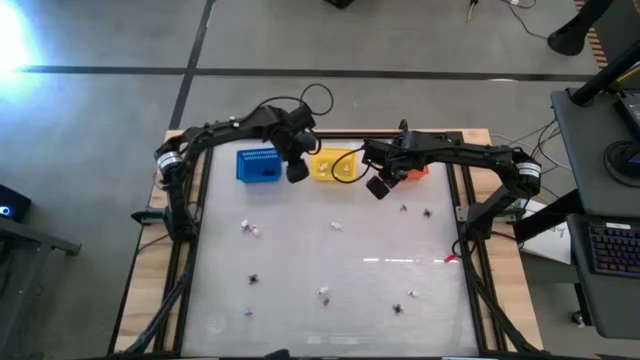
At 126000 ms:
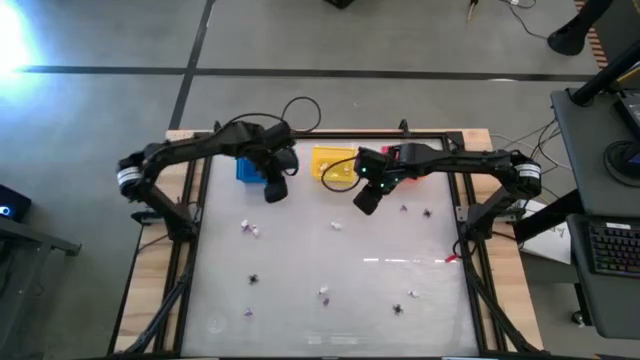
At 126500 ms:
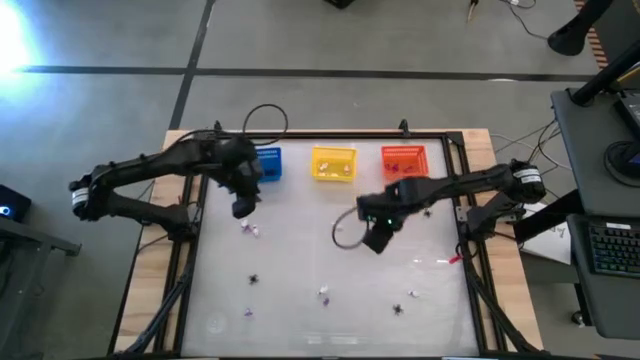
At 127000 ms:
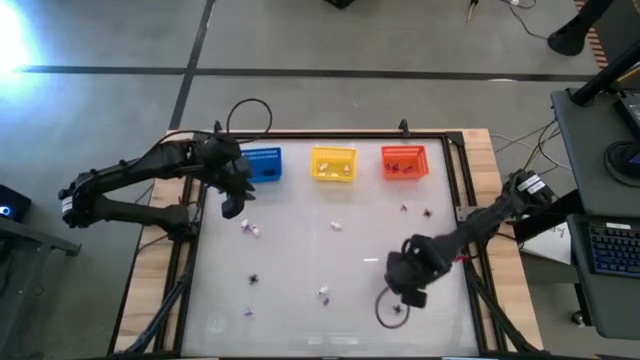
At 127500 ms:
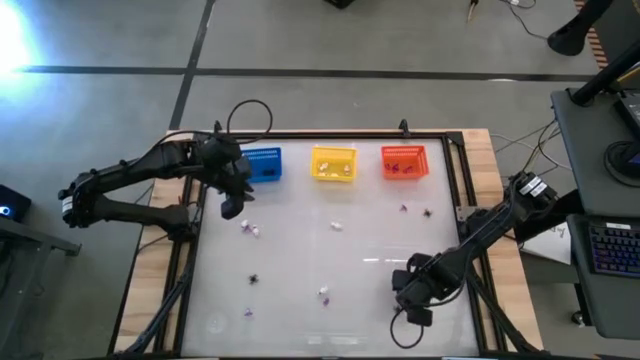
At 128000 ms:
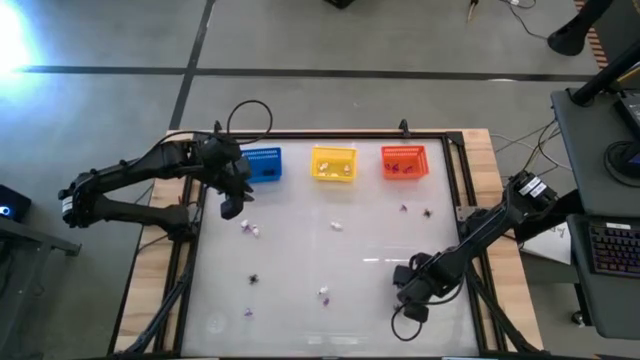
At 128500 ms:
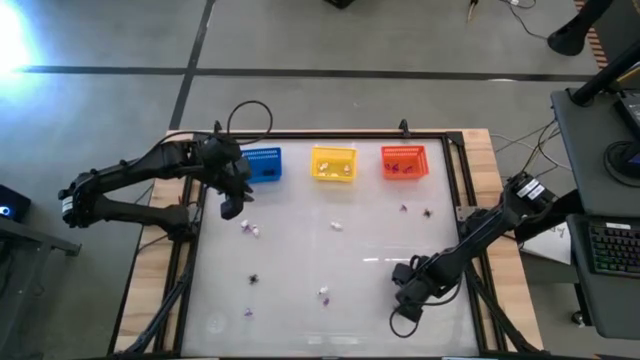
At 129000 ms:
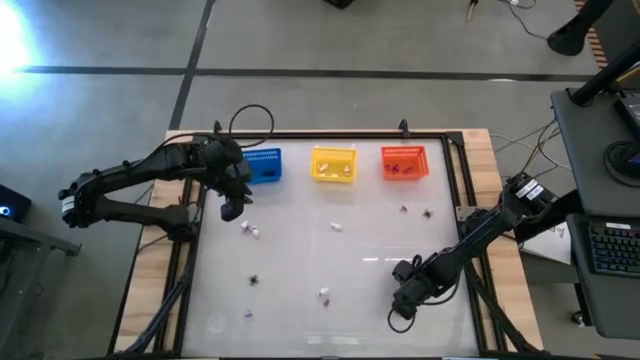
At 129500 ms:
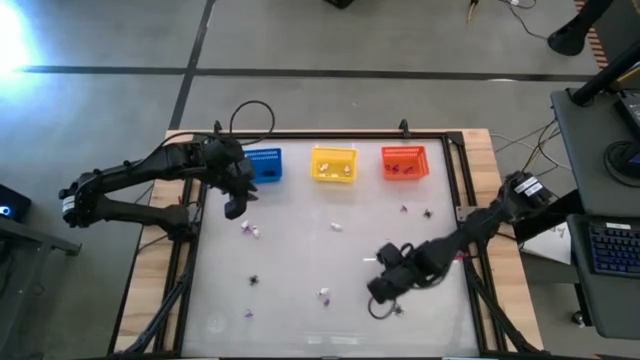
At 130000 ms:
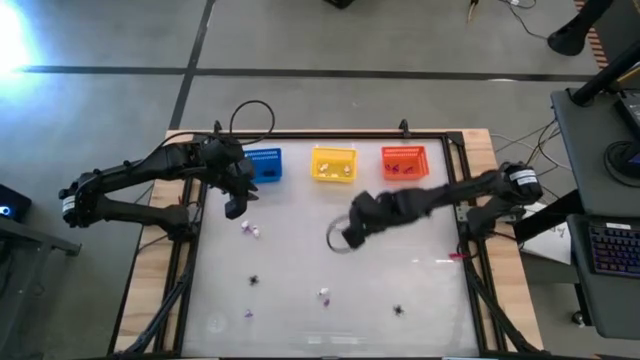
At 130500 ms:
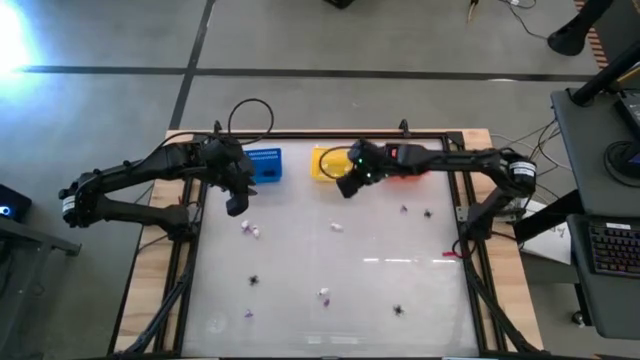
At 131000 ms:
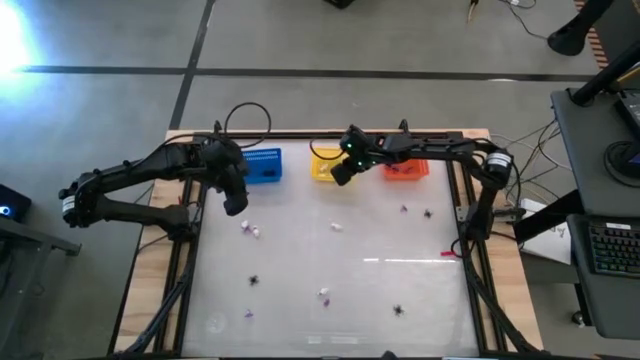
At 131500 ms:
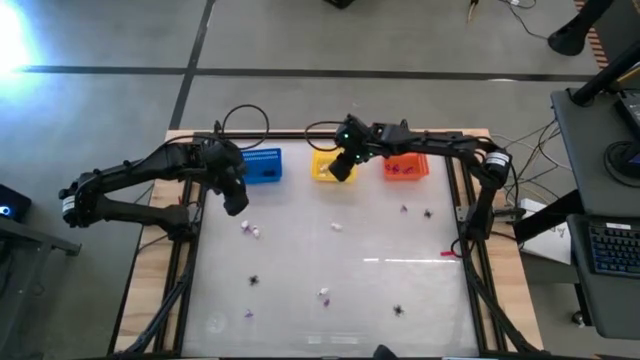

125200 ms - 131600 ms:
Task: Sort Halloween decoration
Put the white skeleton toy into the yellow bin

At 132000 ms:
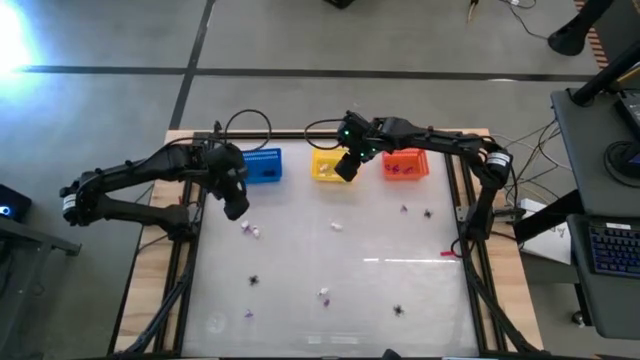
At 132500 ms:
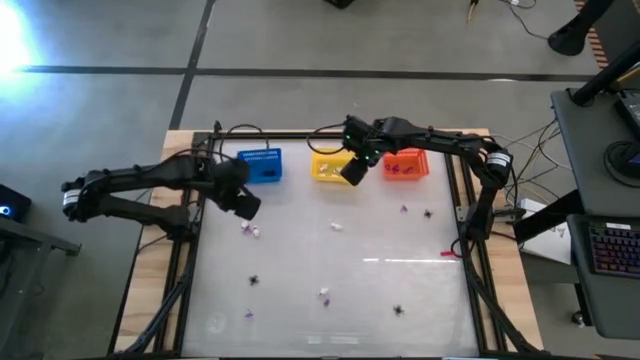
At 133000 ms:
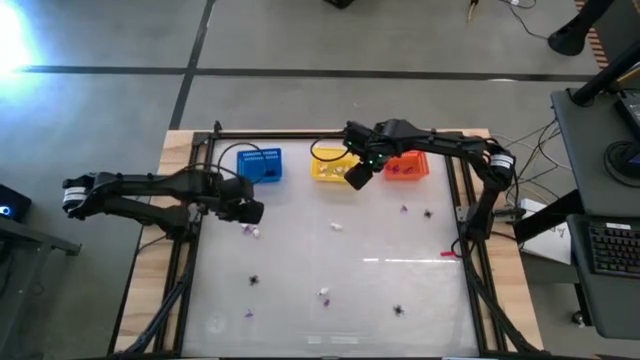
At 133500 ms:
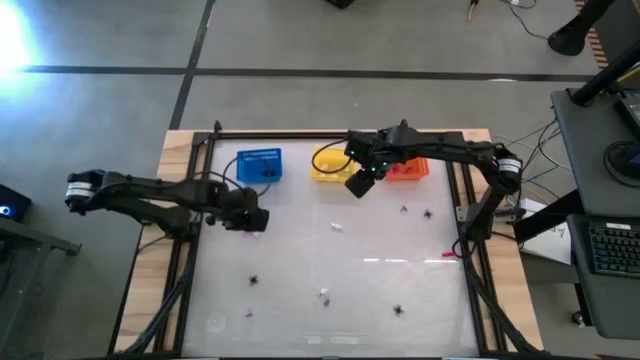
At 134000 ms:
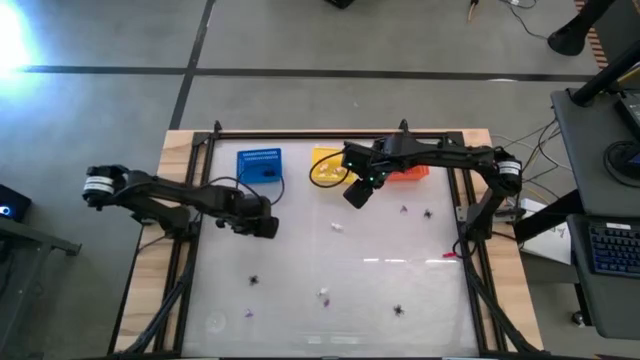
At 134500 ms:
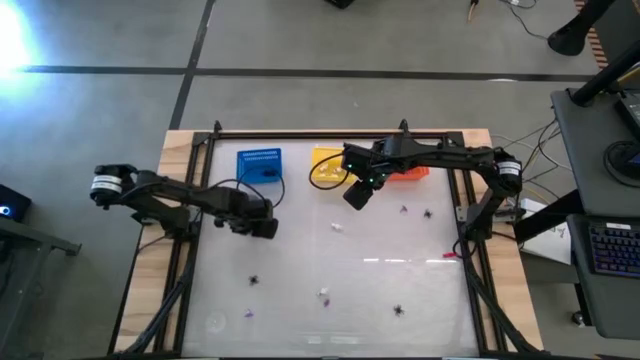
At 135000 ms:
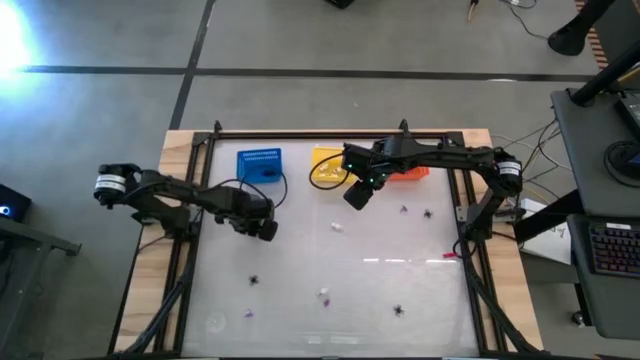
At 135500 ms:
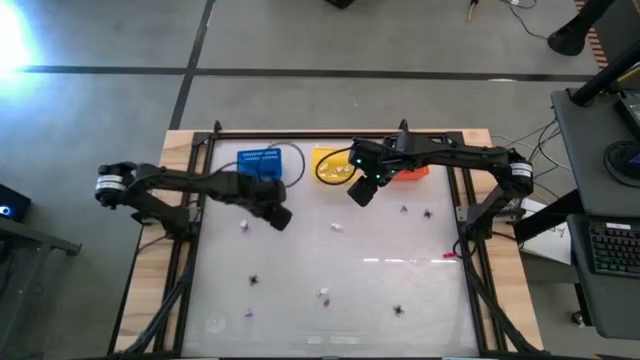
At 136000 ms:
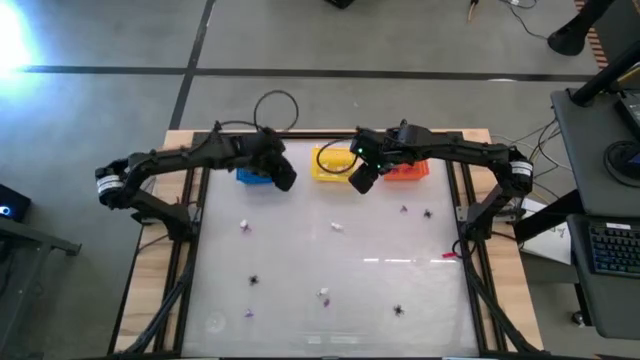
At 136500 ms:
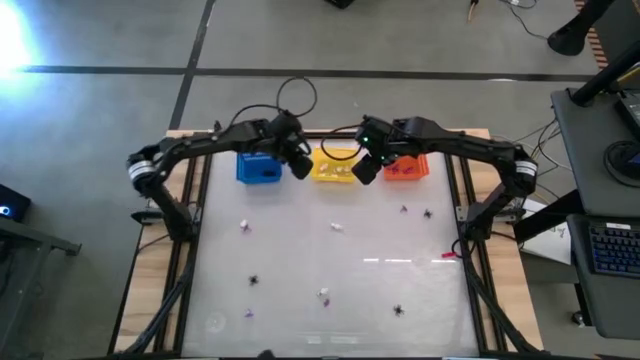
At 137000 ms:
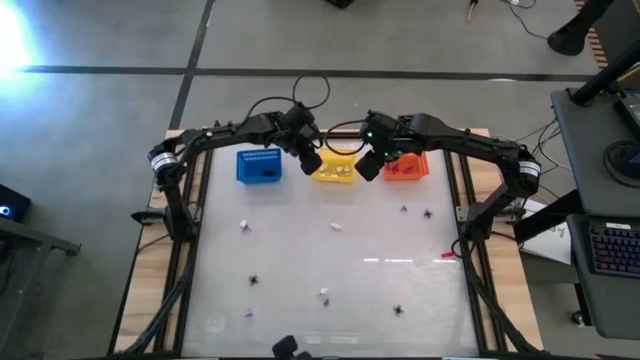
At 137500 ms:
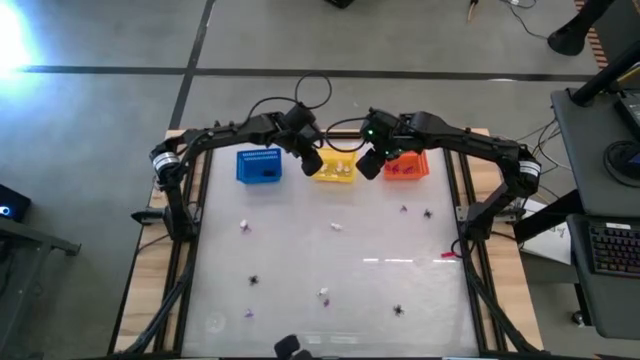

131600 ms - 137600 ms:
Put the white skeleton toy into the yellow bin

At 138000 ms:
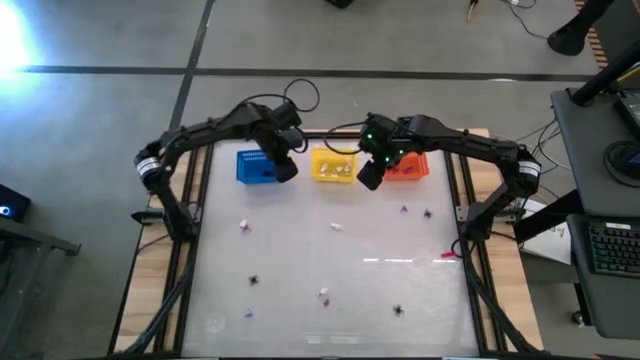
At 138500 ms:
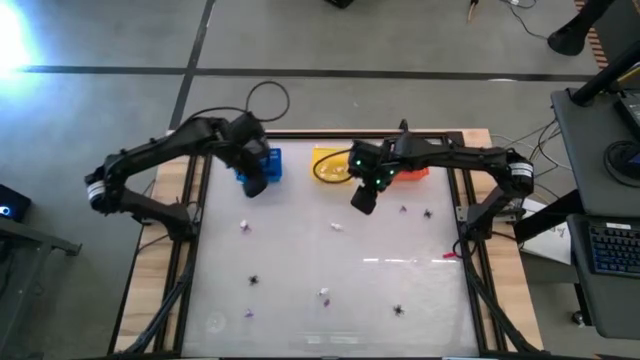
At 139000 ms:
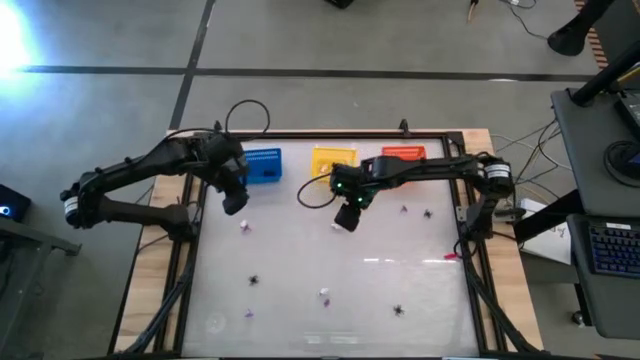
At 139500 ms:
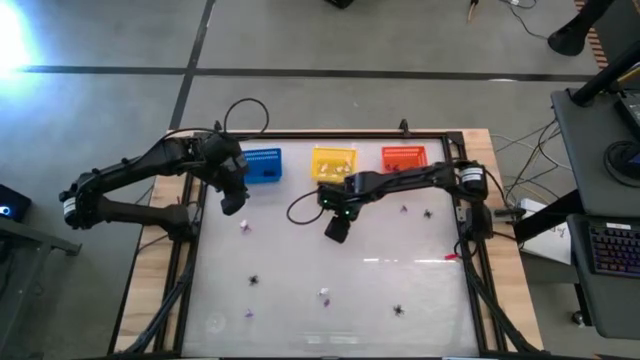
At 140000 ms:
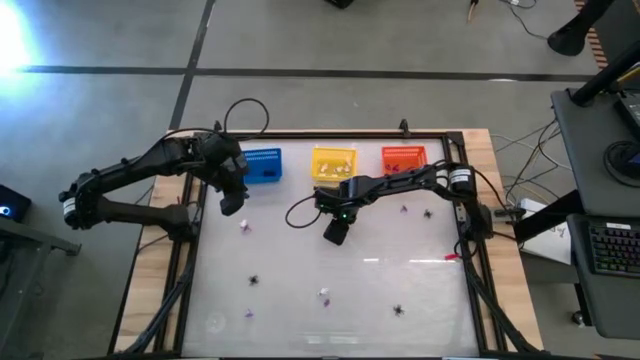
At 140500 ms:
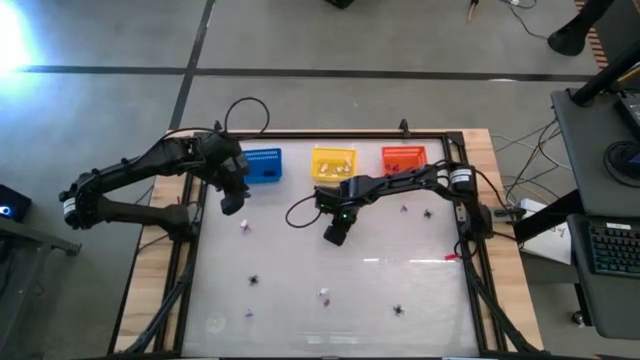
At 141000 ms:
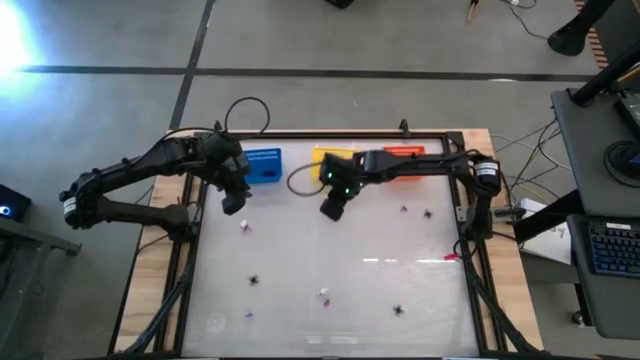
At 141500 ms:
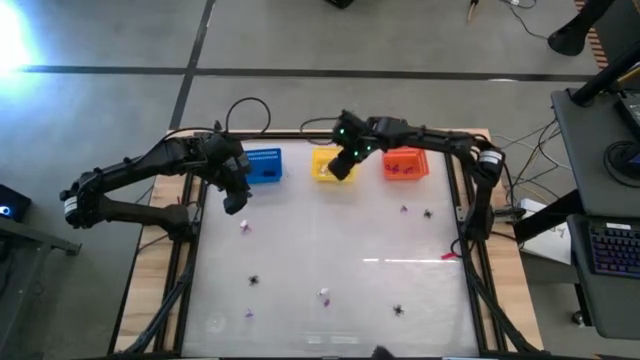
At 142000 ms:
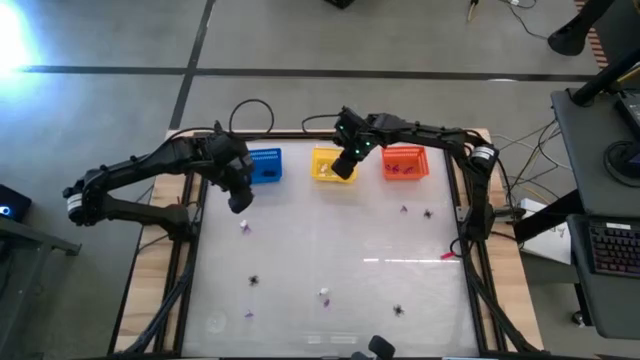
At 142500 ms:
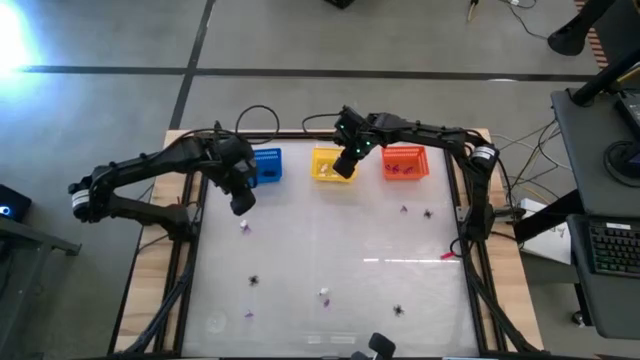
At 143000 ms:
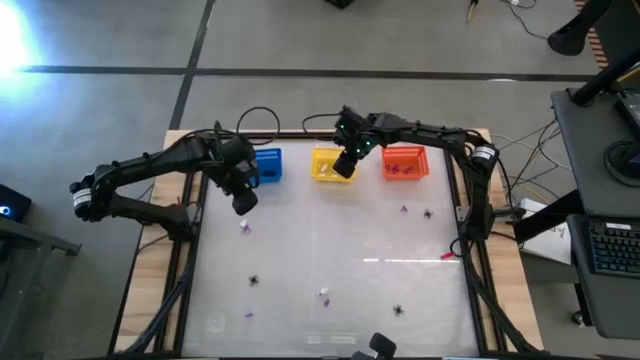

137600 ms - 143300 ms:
Put the white skeleton toy into the yellow bin

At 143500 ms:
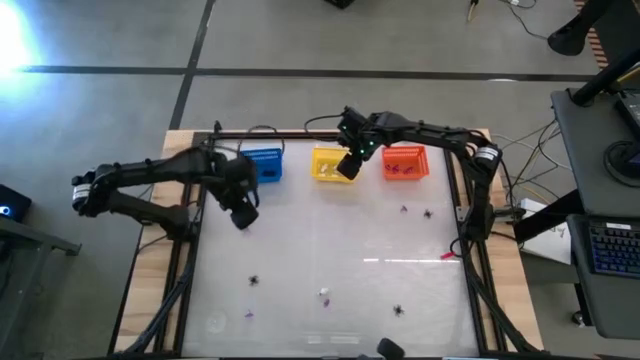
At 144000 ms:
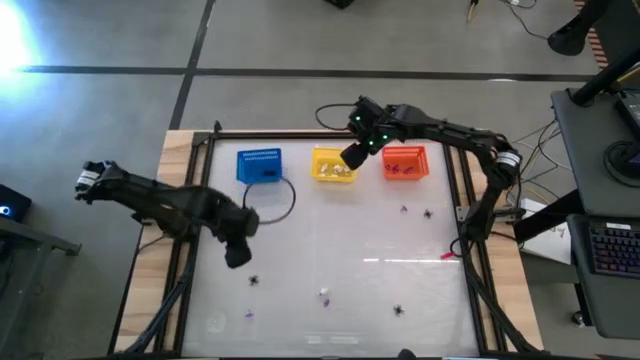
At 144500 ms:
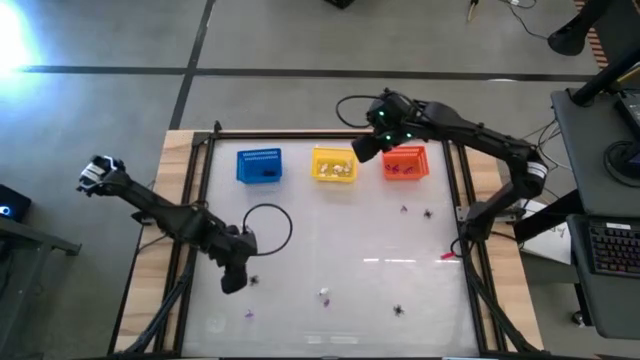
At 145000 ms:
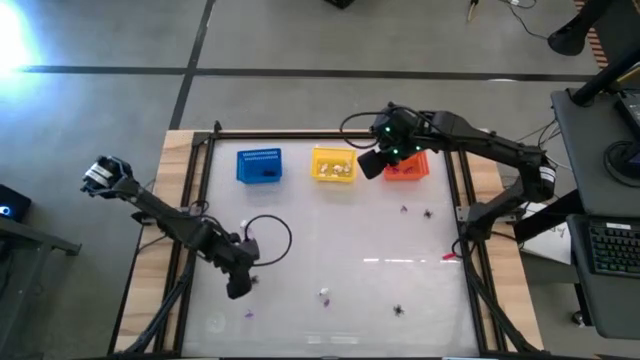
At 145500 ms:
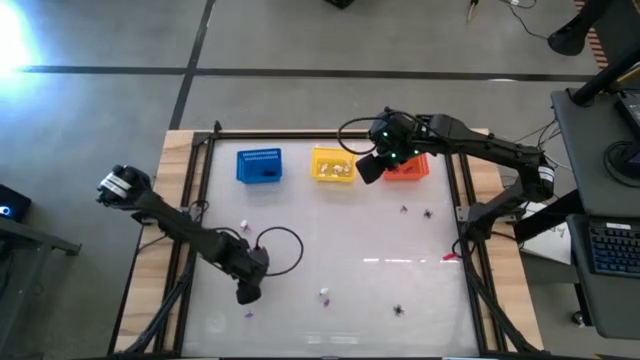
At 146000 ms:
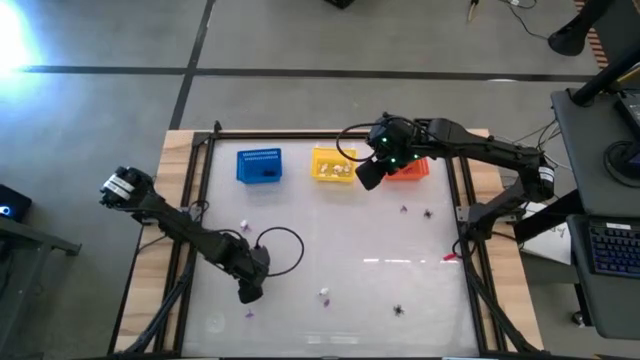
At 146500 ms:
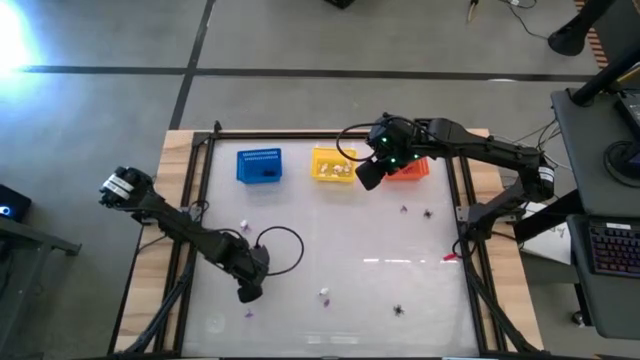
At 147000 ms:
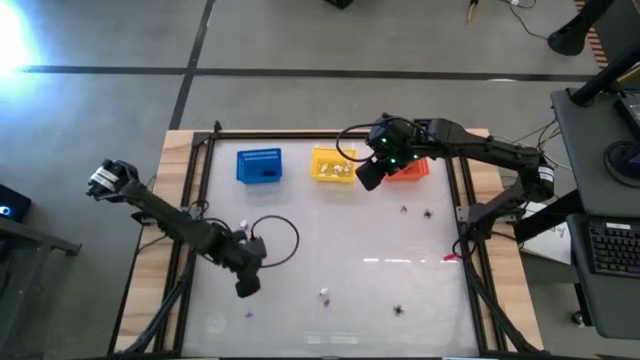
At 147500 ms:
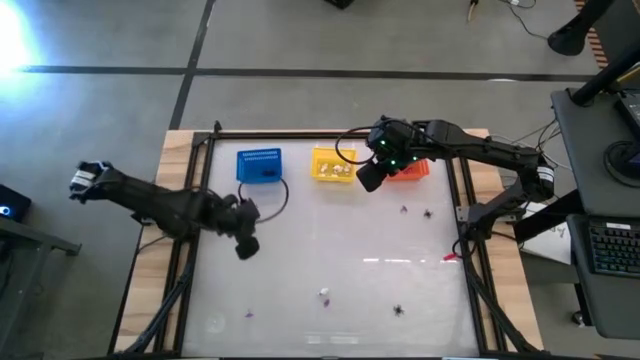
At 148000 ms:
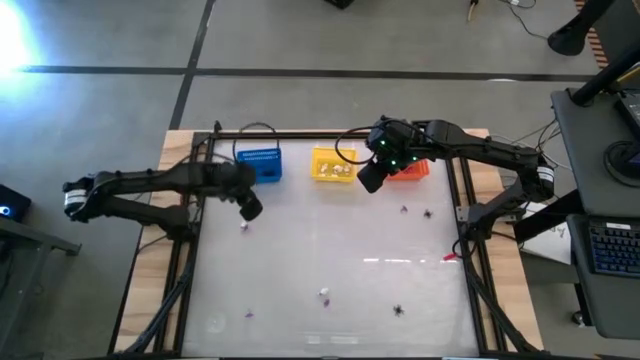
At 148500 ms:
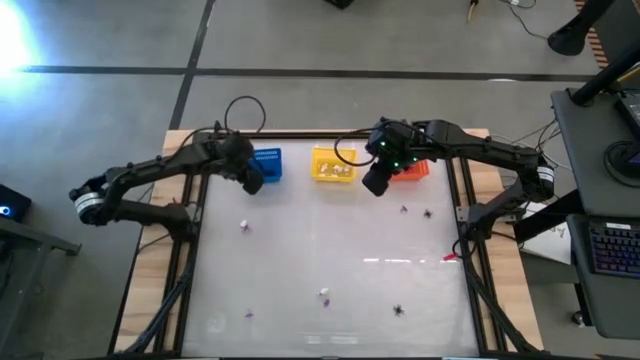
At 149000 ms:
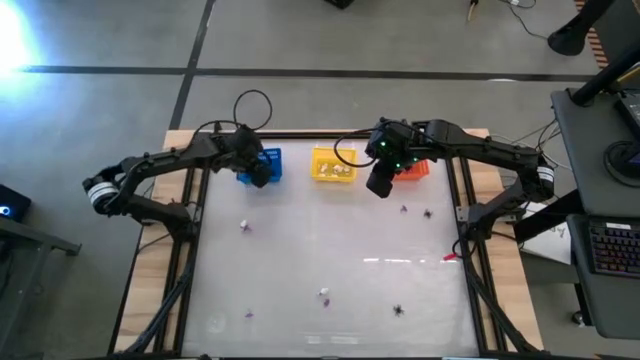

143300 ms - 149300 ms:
Put the black spider toy into the blue bin
